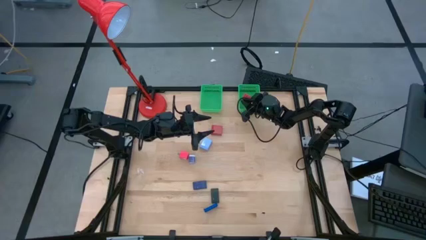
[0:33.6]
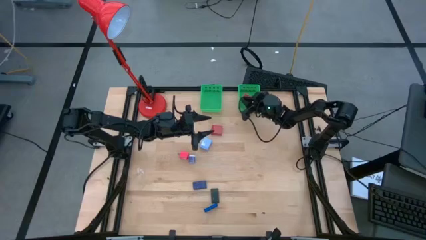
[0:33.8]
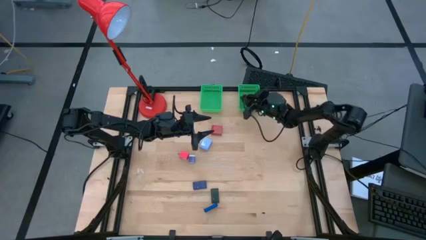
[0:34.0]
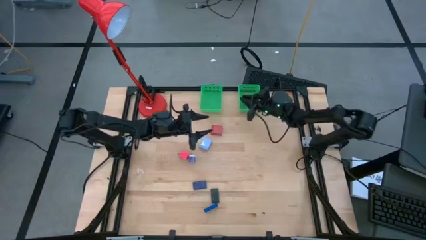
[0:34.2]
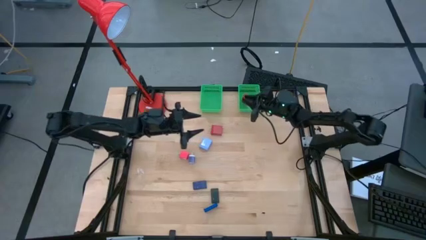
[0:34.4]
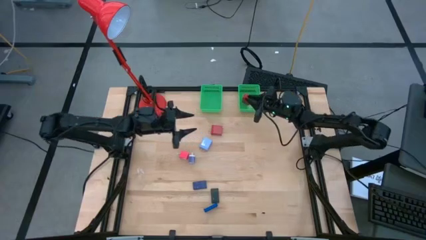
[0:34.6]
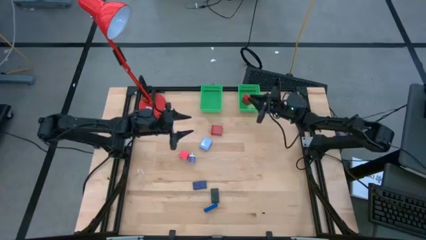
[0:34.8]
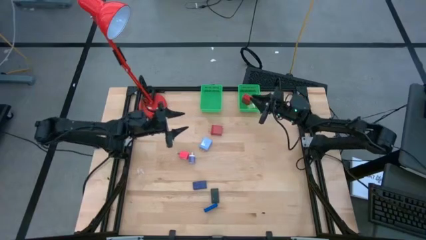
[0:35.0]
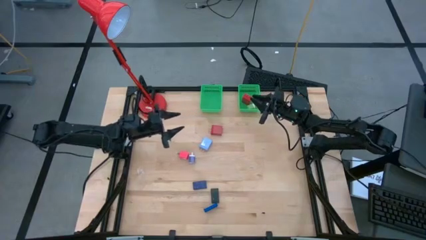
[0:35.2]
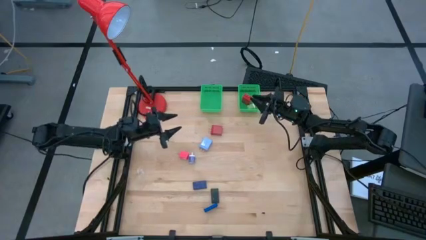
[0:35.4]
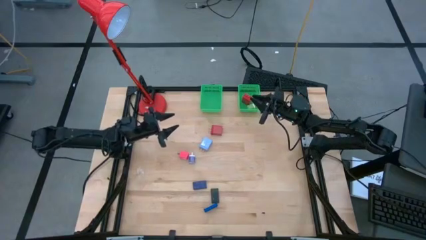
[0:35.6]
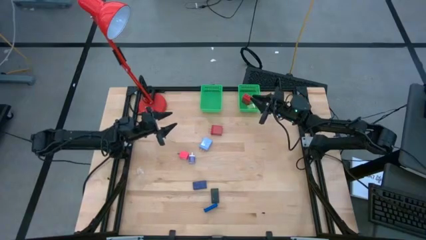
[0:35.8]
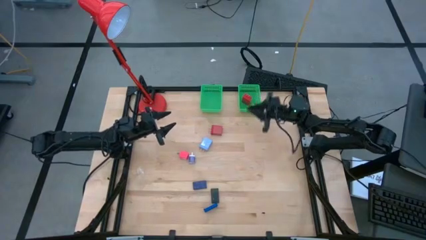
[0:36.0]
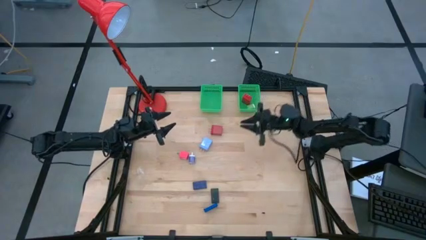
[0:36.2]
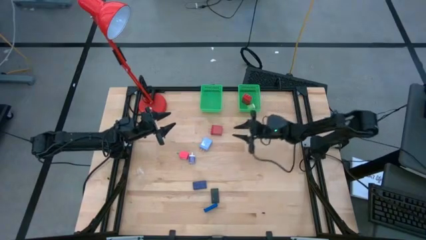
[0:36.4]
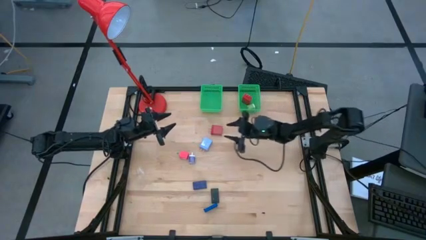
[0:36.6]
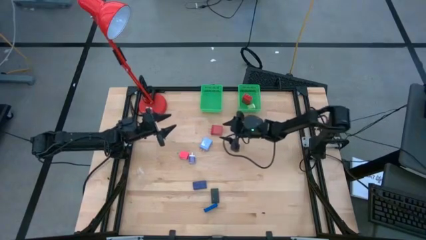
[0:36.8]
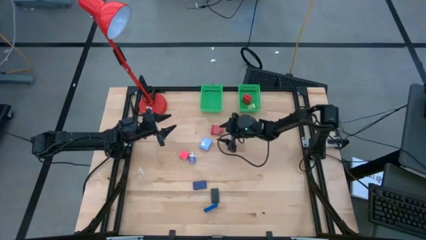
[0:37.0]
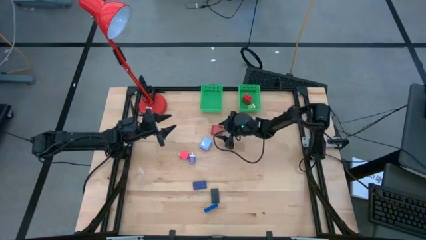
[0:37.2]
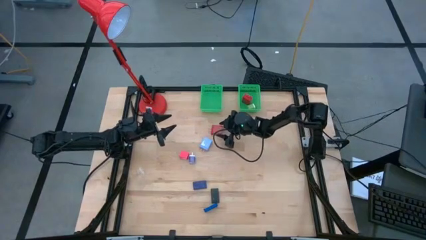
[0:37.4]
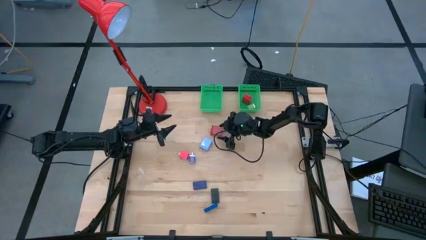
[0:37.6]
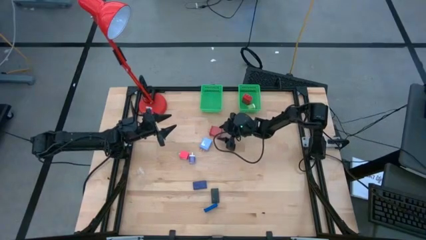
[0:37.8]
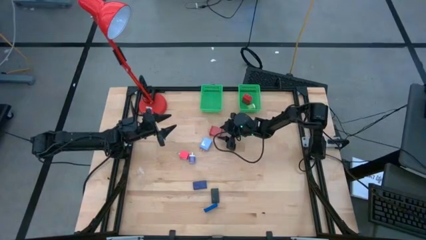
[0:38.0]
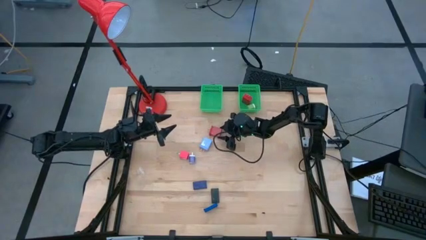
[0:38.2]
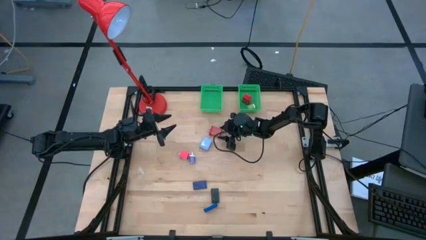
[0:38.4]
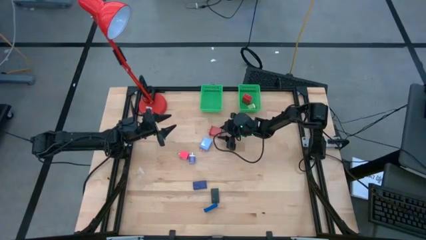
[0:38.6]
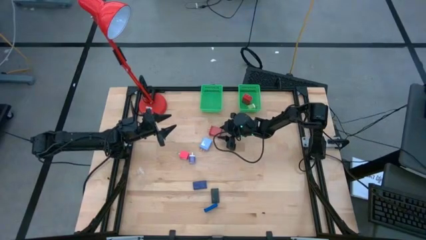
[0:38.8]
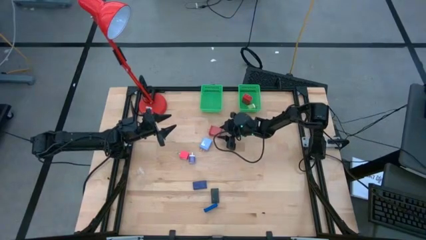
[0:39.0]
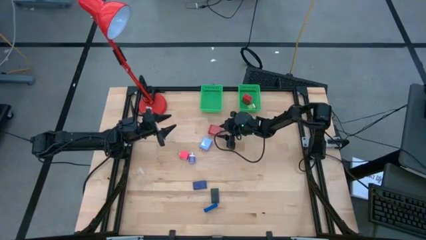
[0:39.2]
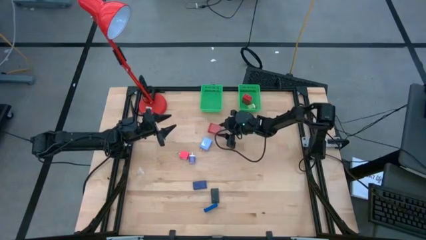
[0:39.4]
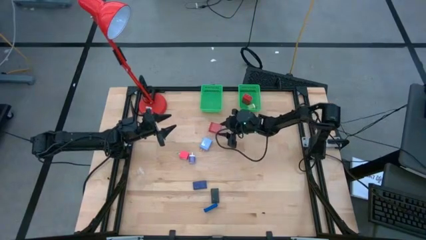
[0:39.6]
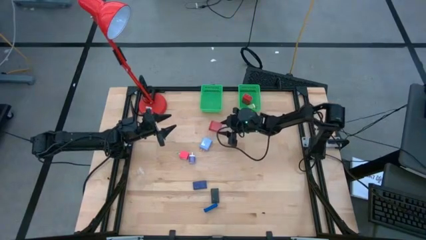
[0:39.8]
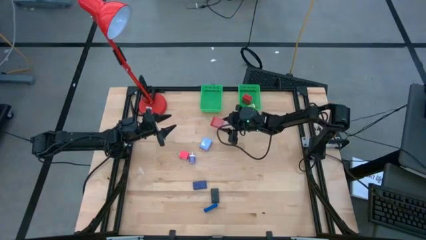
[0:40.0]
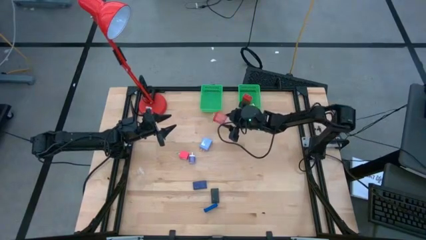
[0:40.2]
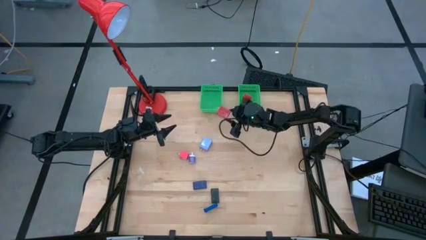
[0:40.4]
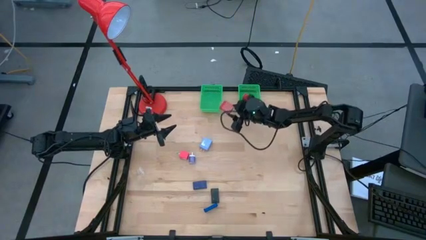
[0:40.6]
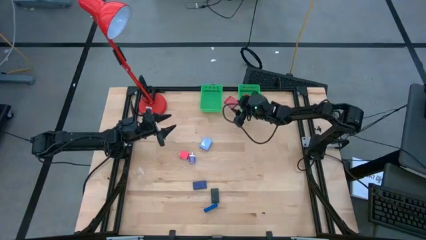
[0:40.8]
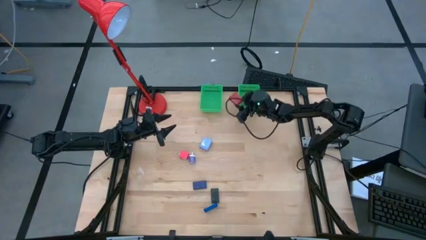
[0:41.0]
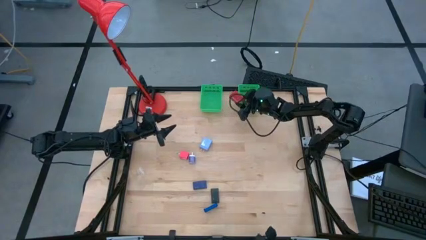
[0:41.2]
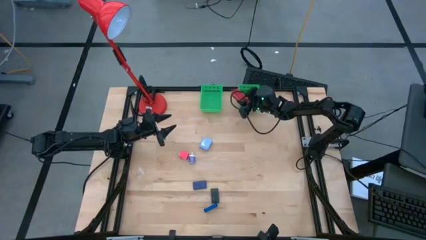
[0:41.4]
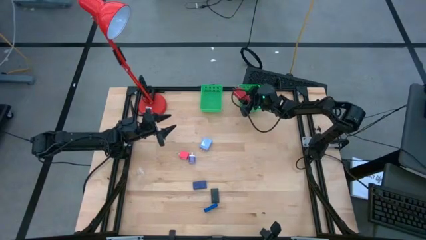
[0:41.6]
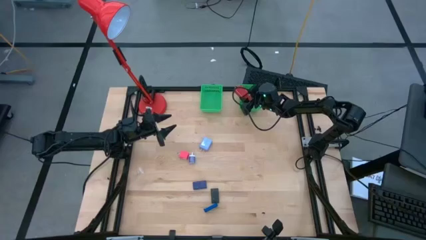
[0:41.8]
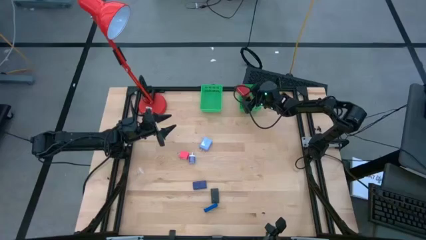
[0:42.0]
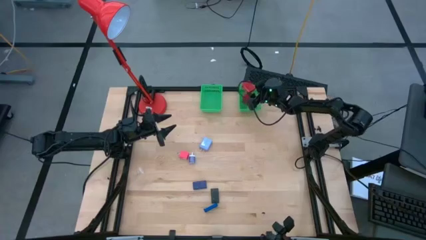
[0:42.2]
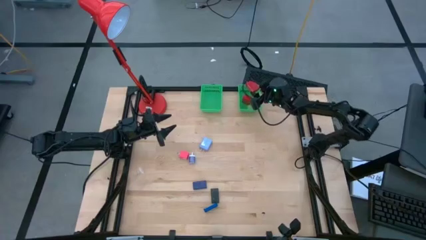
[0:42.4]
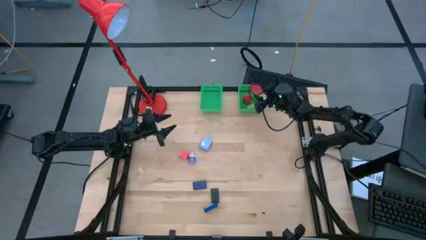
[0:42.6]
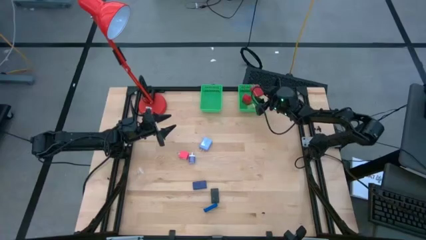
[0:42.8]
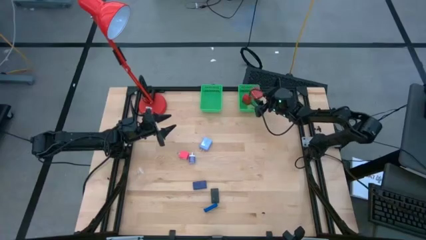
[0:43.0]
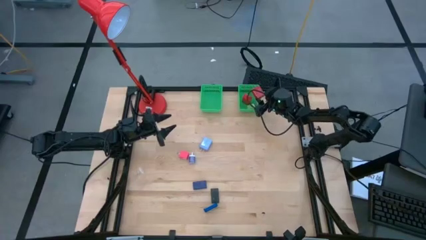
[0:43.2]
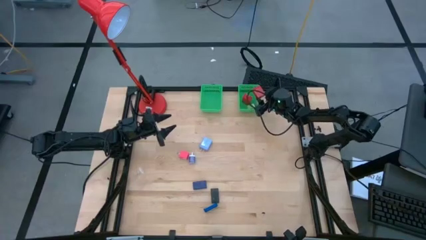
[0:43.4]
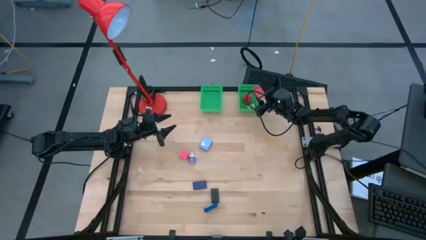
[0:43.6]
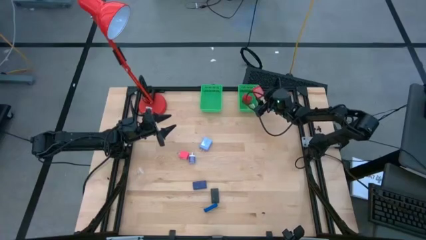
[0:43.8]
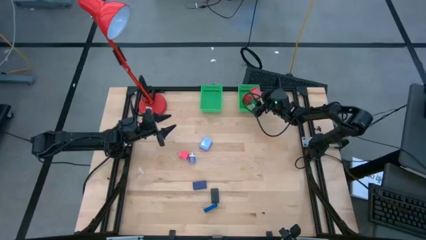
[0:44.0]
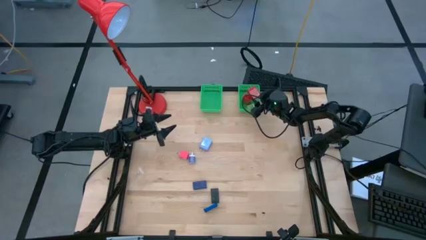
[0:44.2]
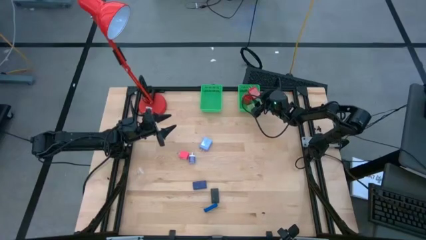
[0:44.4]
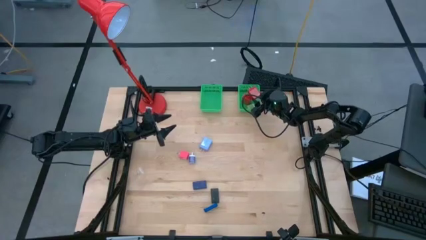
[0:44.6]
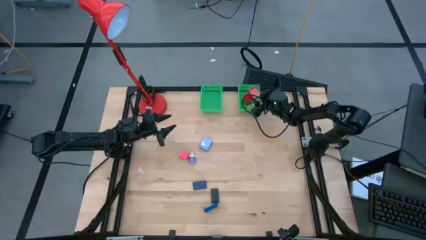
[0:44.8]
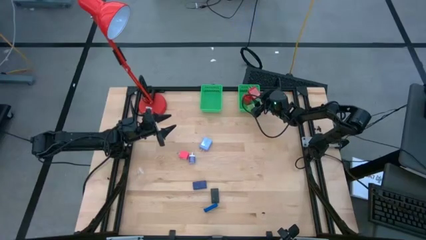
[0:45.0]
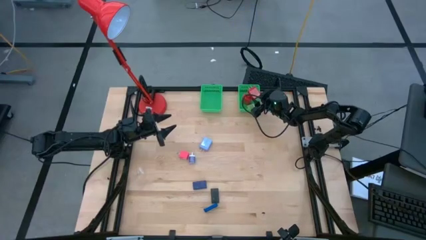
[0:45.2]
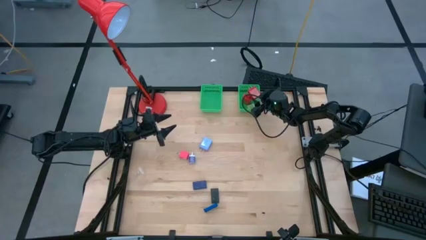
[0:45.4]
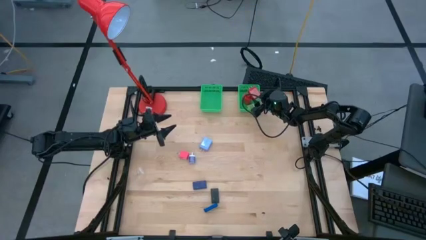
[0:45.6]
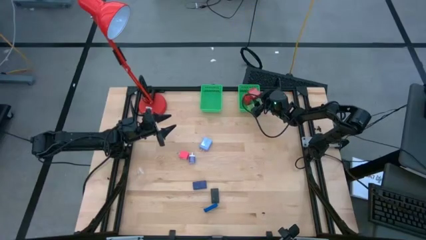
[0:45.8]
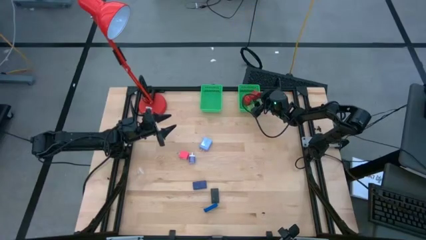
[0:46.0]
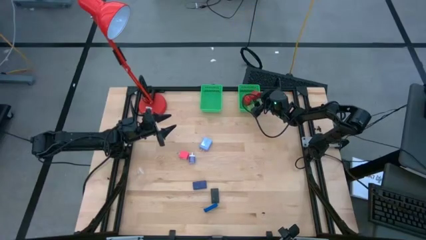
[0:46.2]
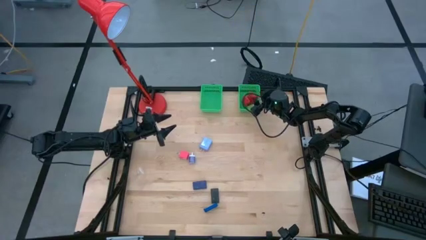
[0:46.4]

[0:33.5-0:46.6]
Task: Pick & Place Office items
Put the red charger adapter into the right green basket
